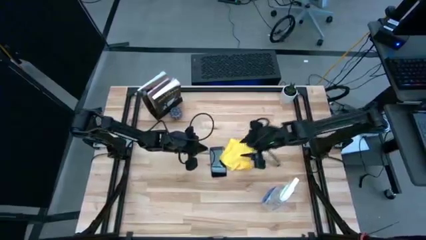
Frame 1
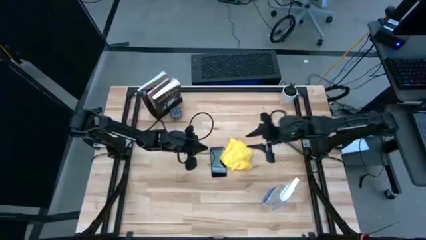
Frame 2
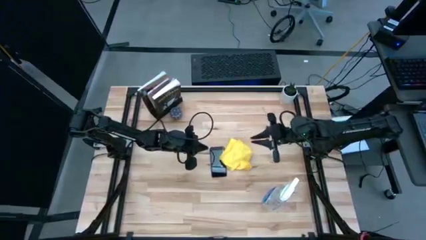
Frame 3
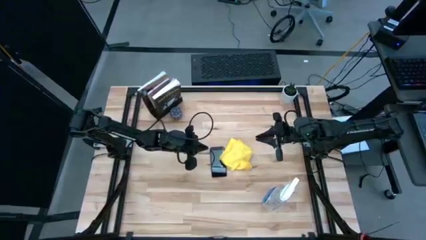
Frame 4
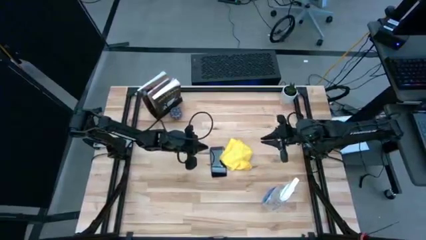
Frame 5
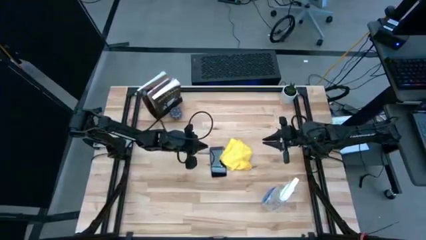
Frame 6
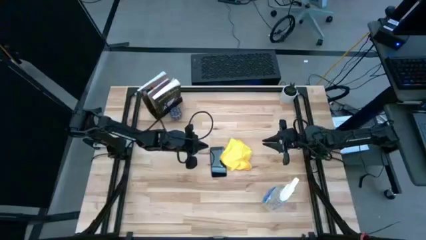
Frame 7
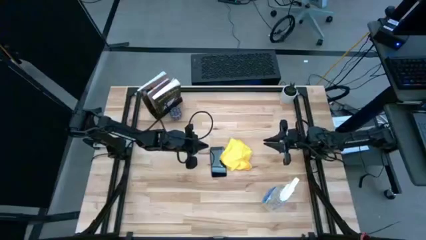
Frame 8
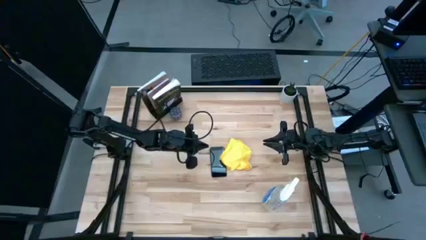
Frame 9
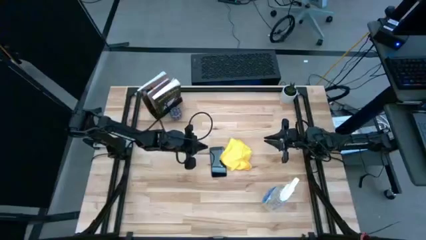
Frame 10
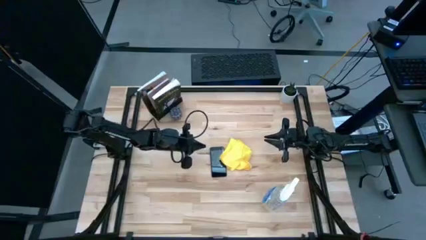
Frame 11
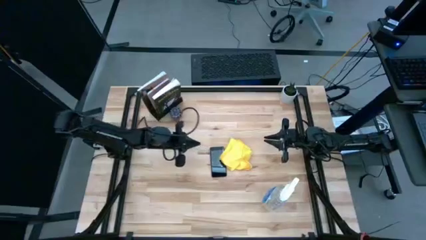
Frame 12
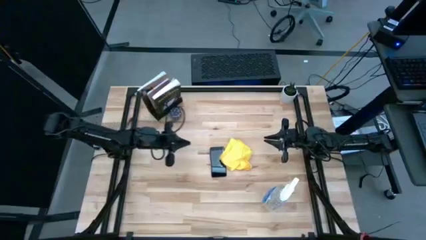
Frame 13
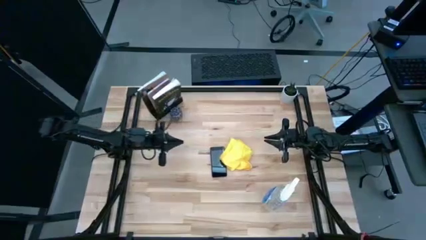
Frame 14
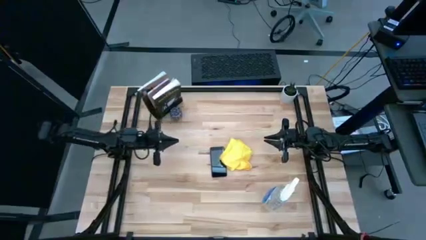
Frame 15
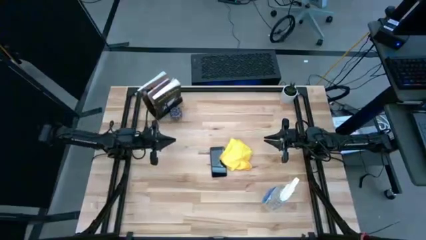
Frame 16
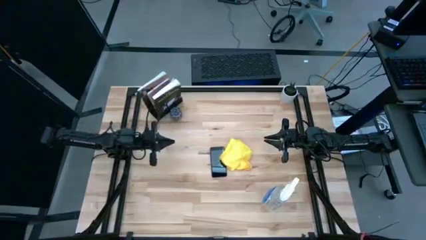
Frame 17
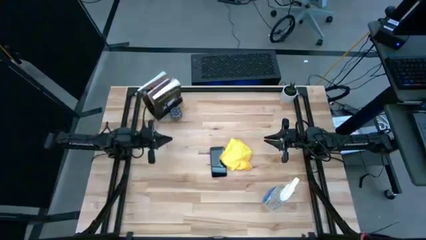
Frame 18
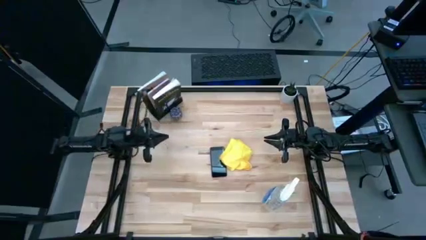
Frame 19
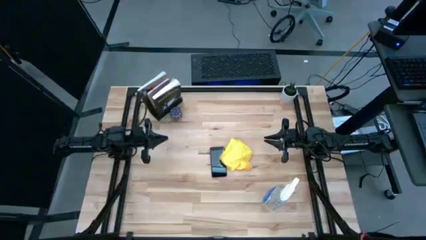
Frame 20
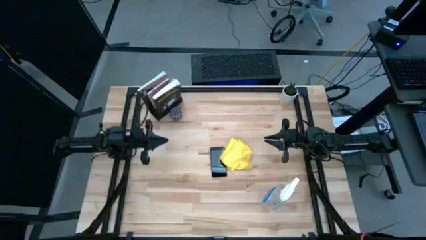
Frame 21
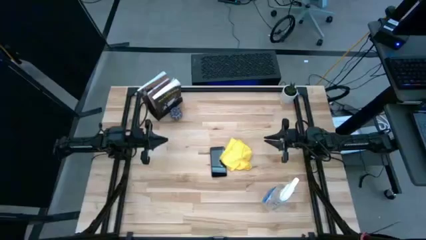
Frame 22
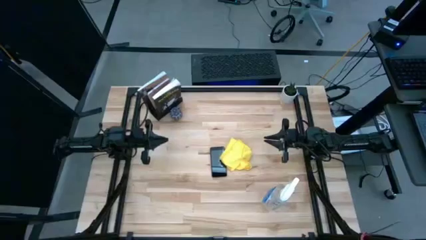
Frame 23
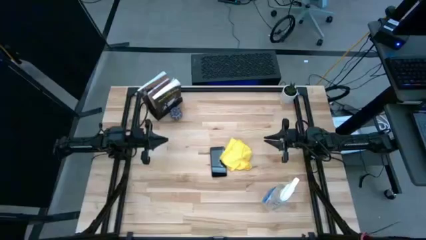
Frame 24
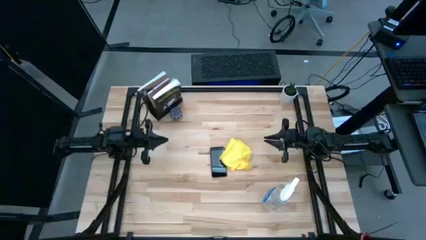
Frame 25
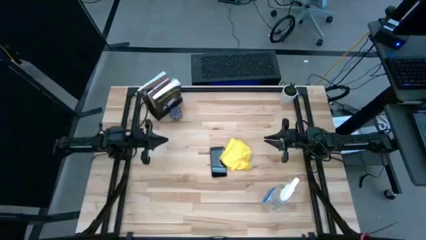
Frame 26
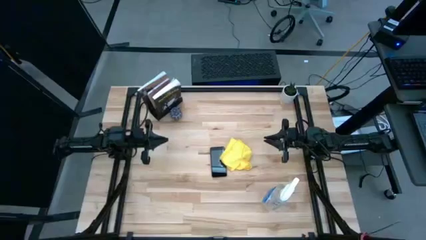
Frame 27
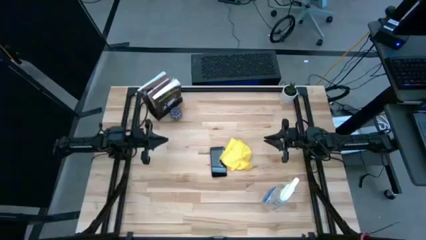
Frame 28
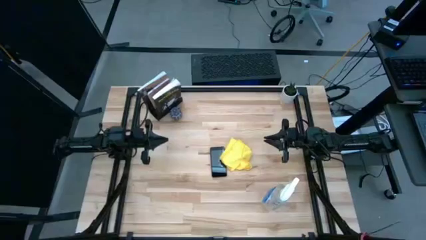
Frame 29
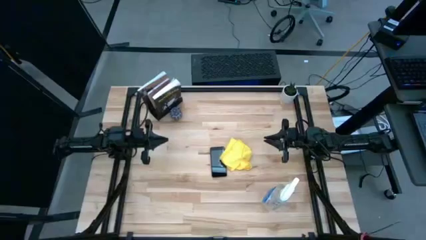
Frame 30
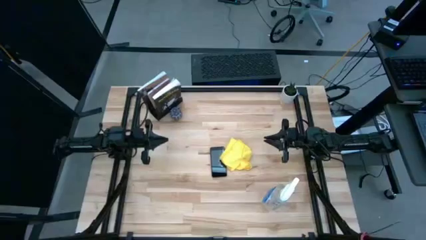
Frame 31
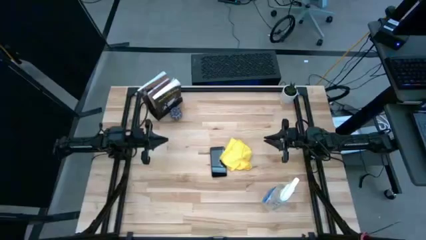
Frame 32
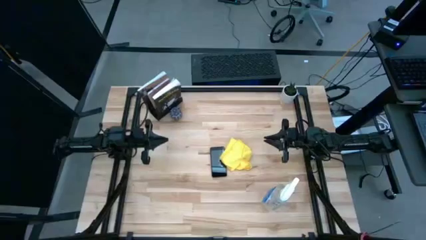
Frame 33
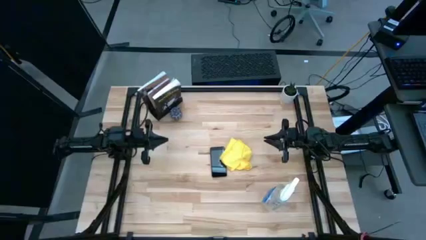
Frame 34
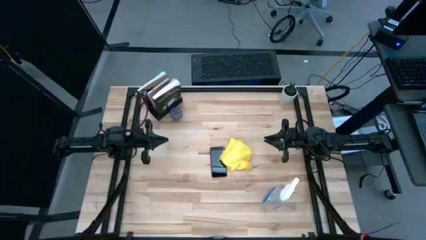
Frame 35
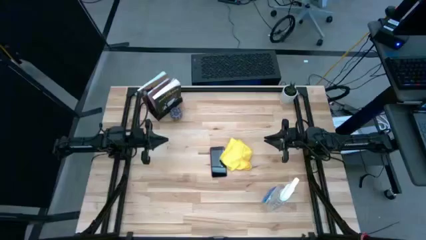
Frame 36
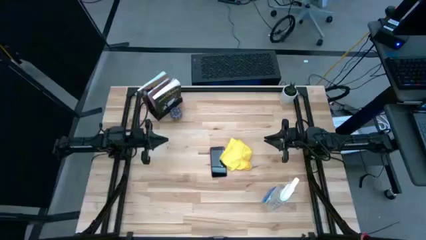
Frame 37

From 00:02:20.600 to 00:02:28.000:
Task: Apply microfiber cloth
Return to Home Position

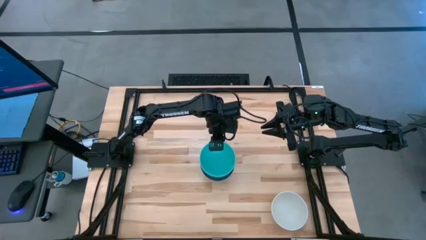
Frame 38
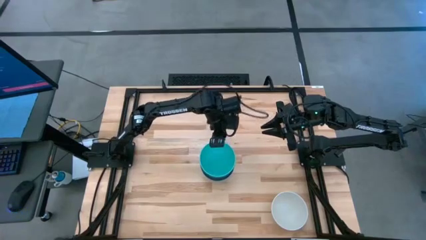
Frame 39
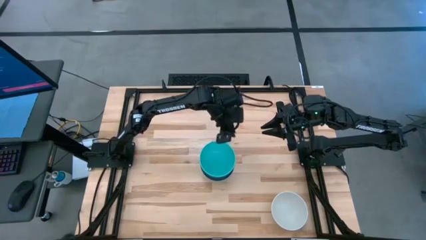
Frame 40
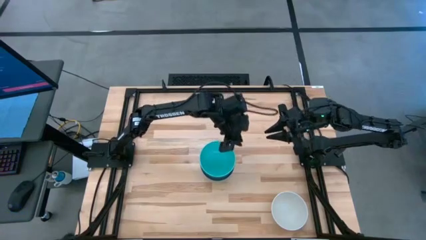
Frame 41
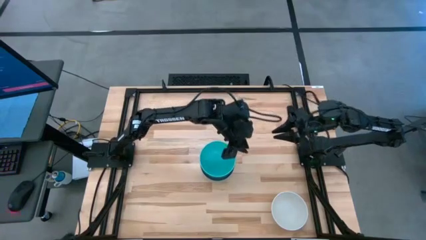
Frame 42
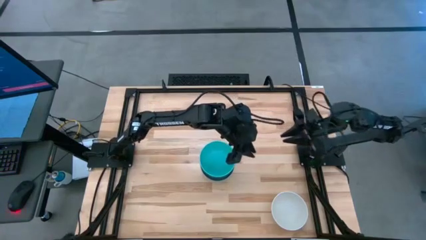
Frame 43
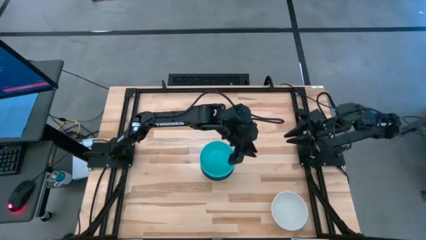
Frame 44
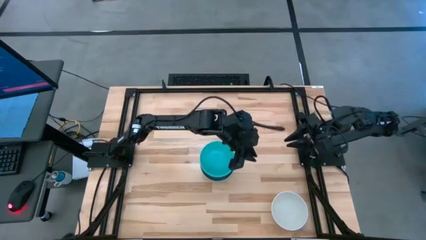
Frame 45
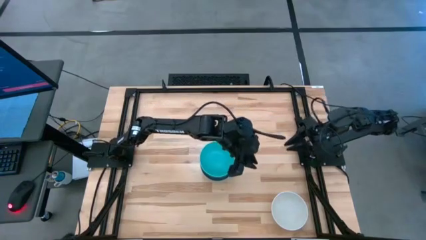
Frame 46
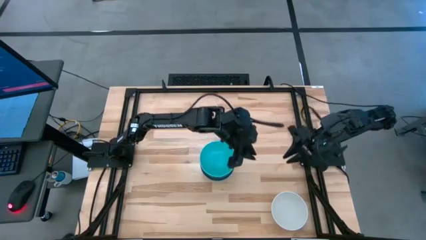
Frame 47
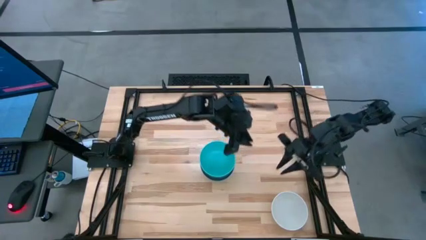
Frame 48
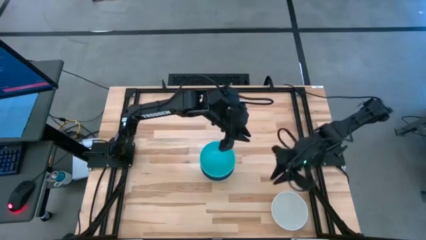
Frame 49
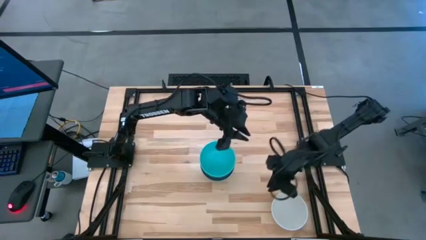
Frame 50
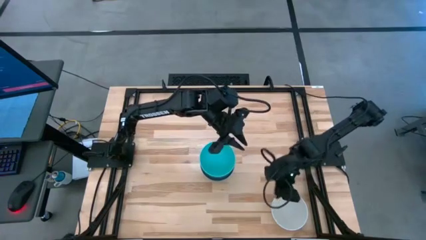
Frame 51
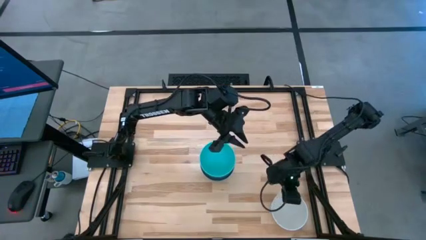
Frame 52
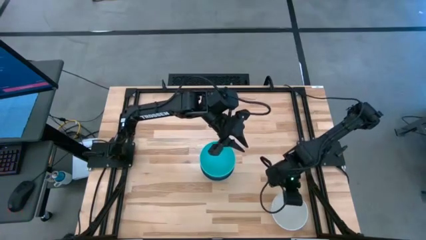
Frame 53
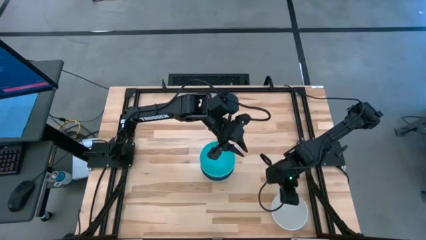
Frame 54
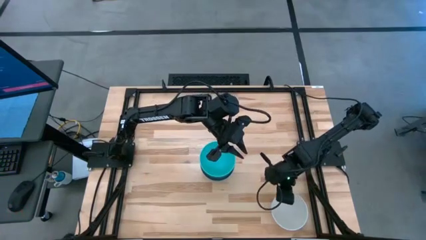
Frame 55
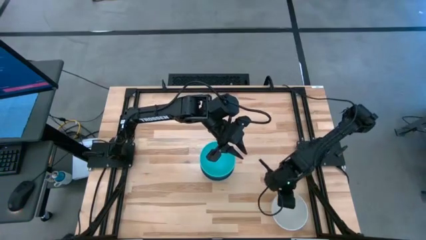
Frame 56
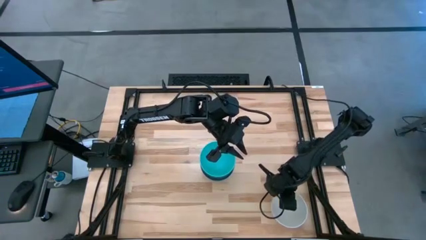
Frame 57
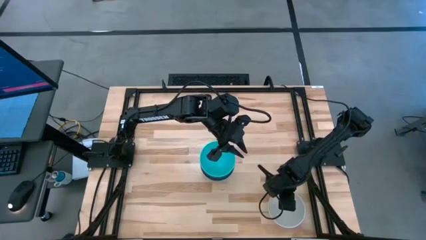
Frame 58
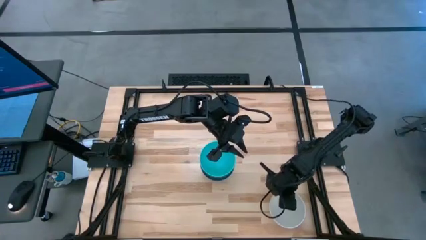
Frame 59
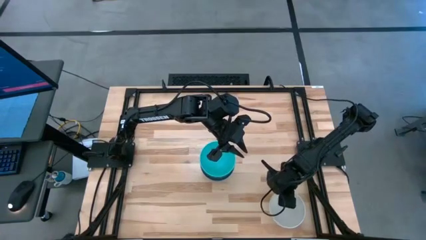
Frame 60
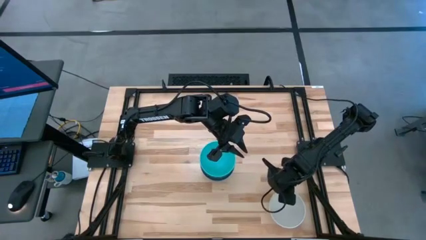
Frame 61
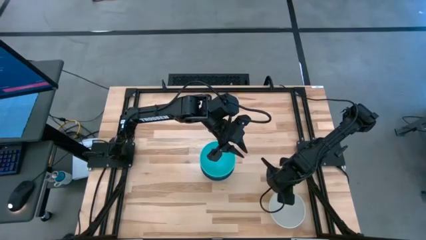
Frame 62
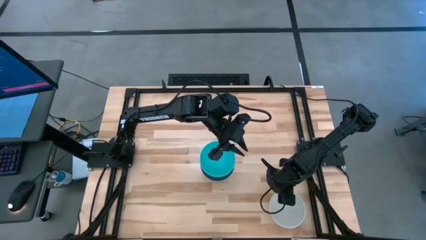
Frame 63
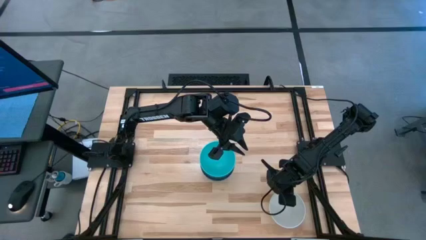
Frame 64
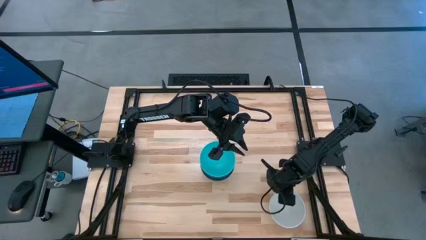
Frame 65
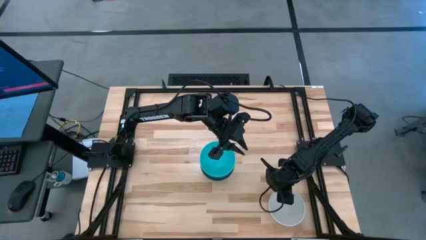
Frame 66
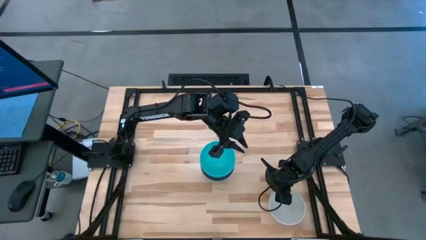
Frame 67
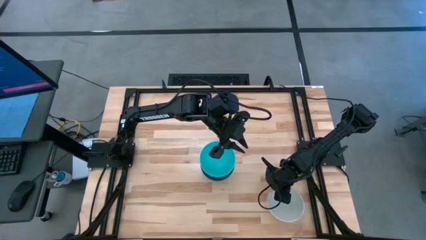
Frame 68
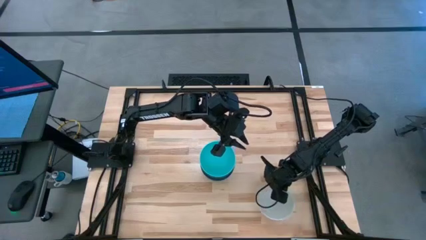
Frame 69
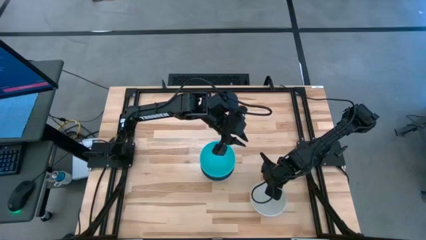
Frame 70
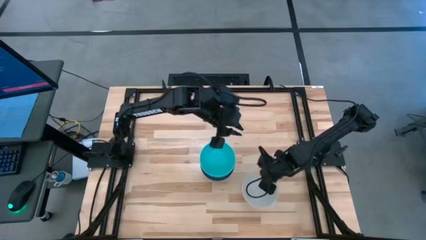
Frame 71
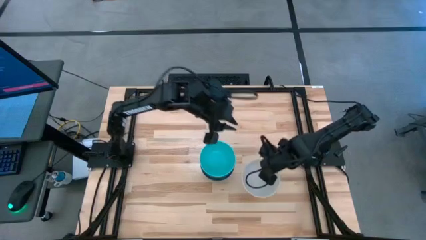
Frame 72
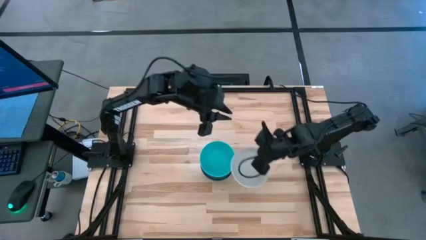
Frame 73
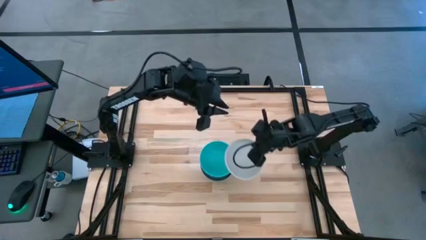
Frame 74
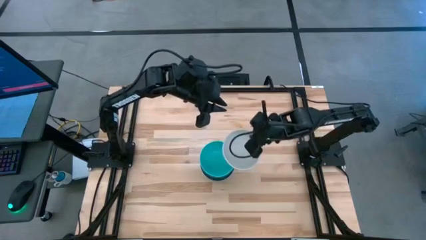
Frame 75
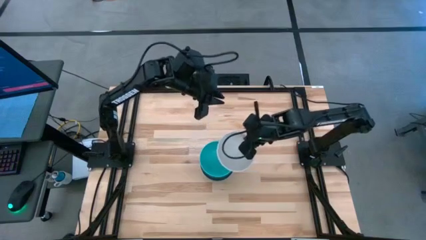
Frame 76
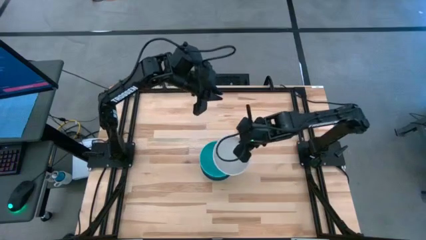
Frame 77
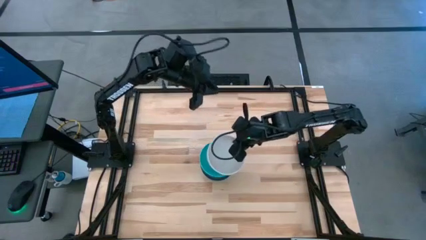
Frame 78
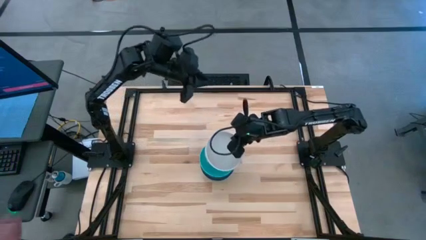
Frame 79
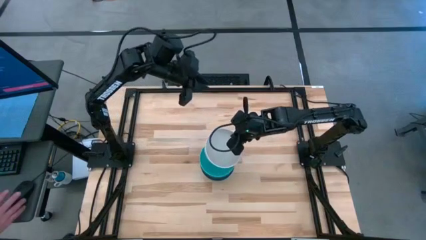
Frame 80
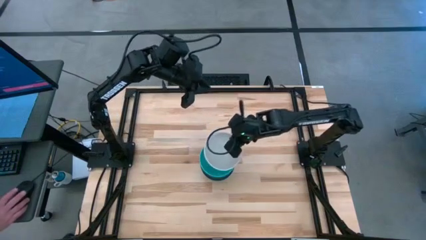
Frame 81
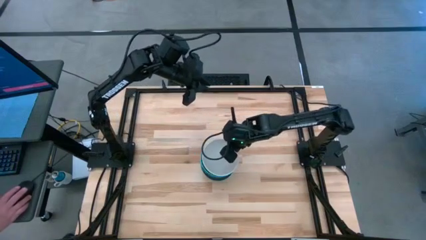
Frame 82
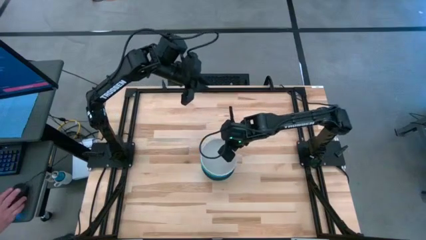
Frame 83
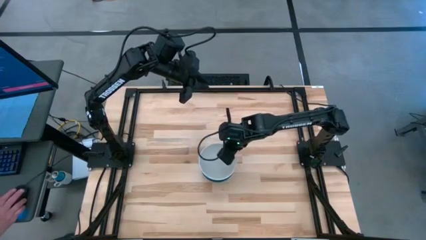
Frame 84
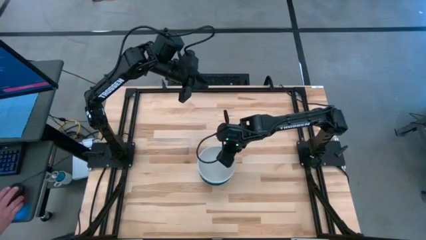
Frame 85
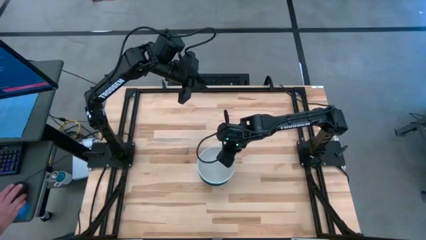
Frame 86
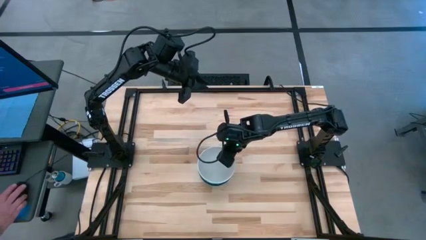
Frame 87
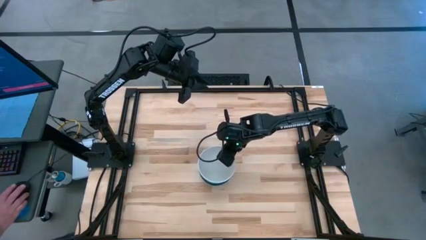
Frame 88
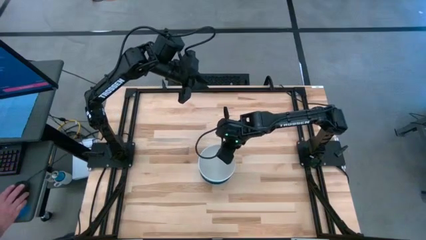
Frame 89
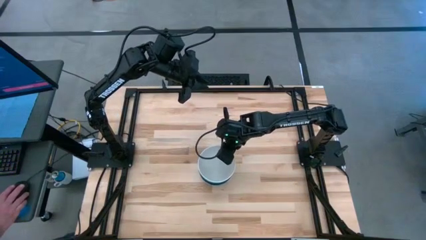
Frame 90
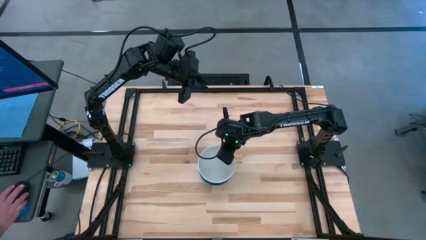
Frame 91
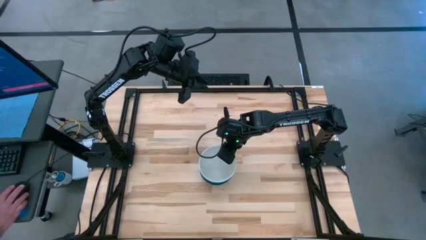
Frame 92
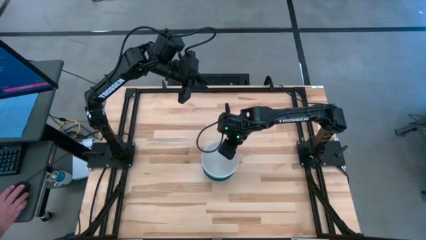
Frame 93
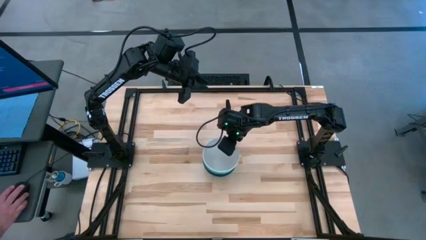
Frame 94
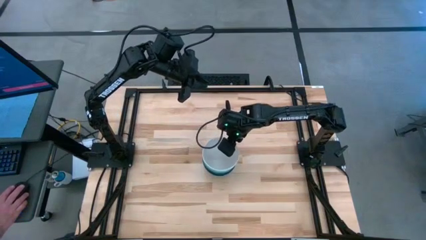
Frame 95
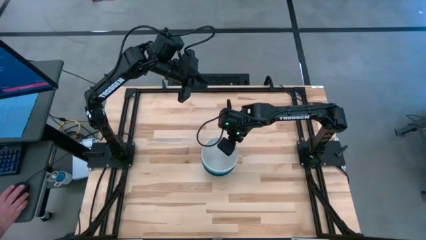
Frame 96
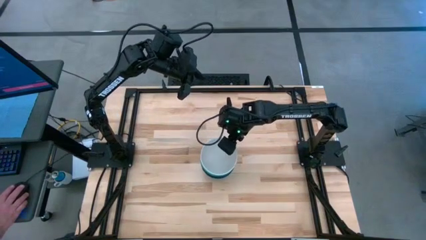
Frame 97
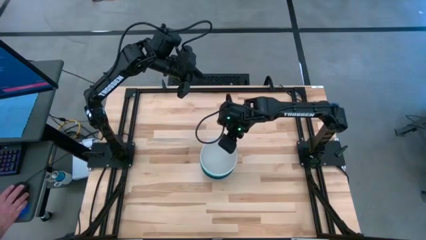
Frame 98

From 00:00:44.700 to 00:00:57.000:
Task: Nest bowls inside each other
Stack the white bowl on the light blue bowl
